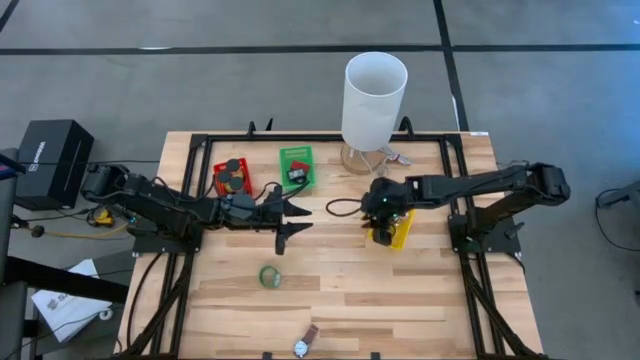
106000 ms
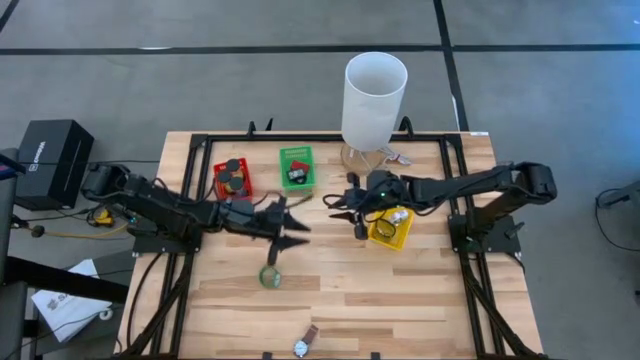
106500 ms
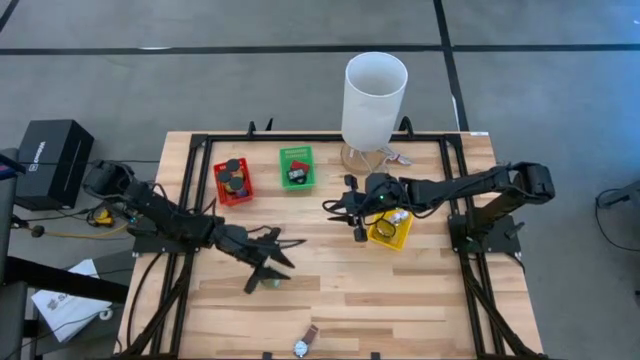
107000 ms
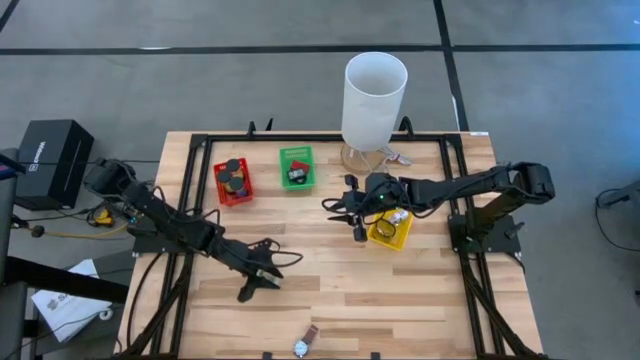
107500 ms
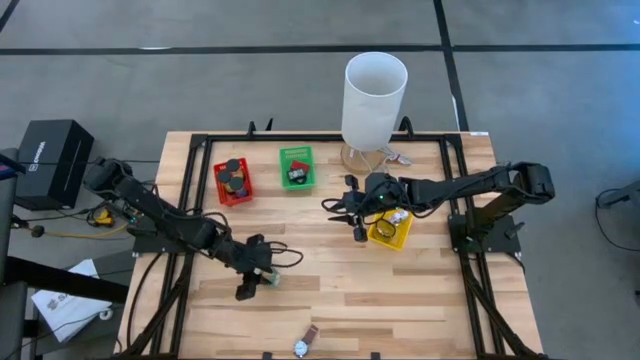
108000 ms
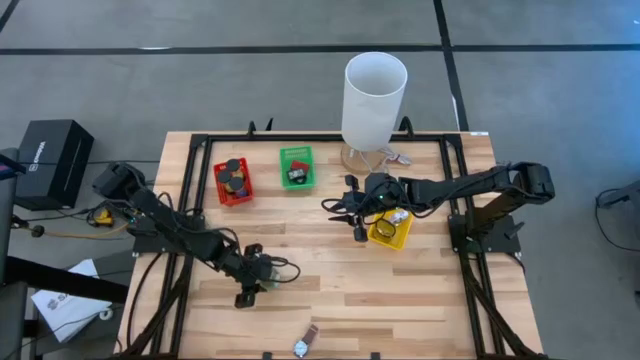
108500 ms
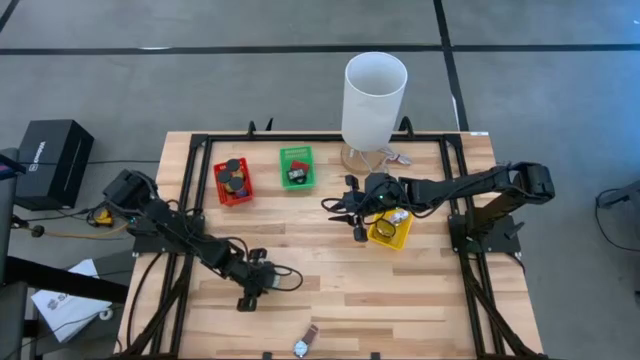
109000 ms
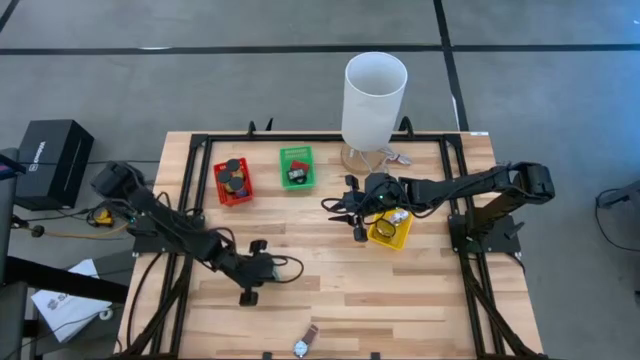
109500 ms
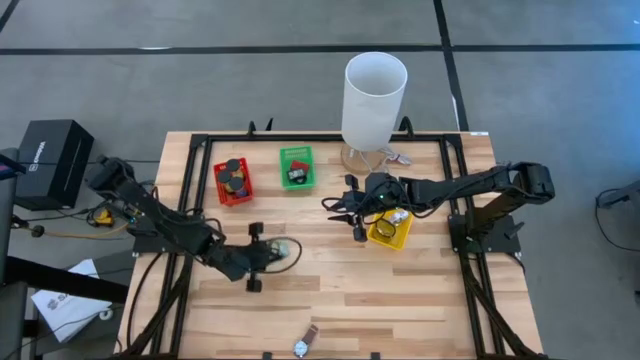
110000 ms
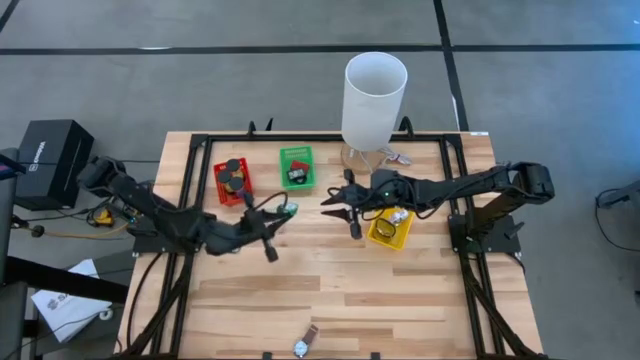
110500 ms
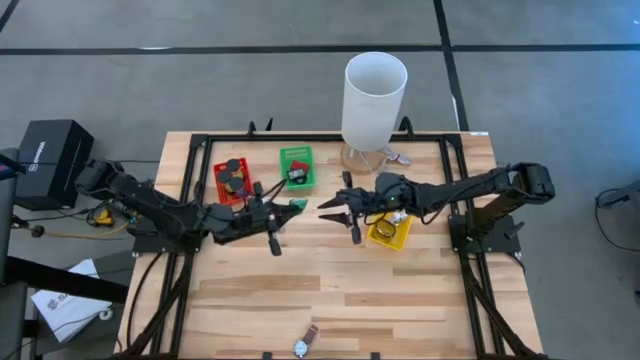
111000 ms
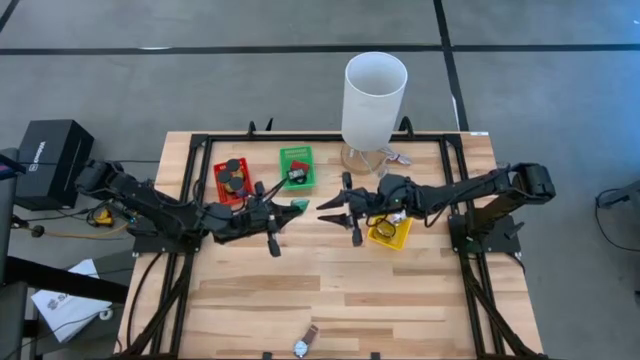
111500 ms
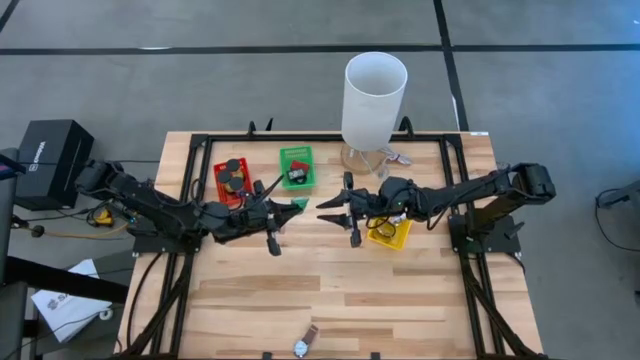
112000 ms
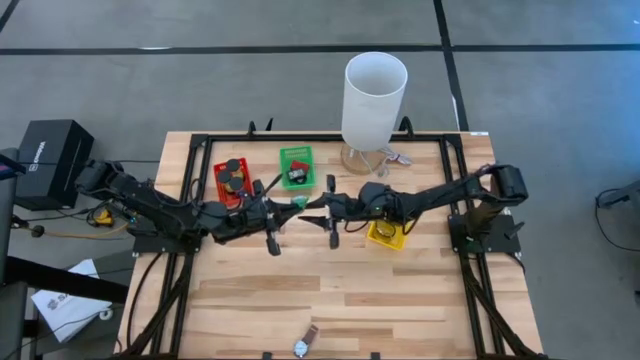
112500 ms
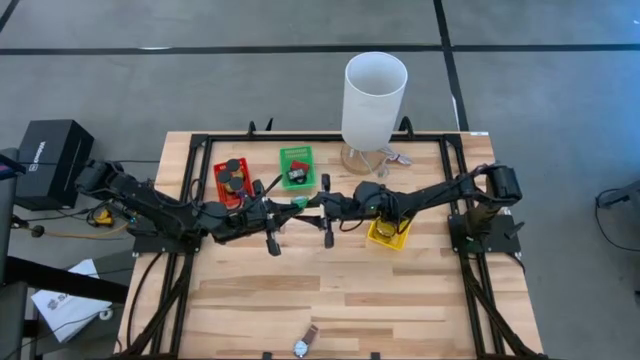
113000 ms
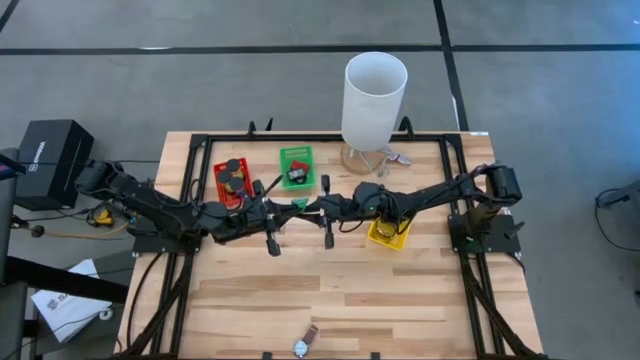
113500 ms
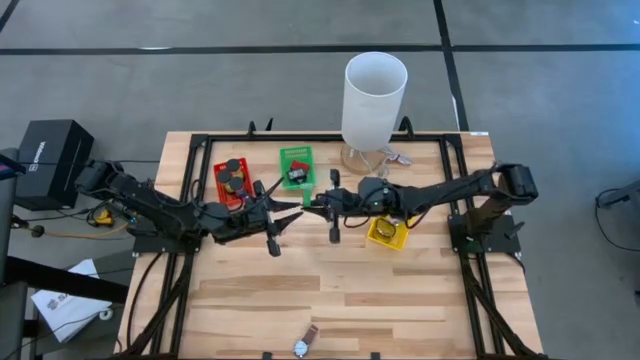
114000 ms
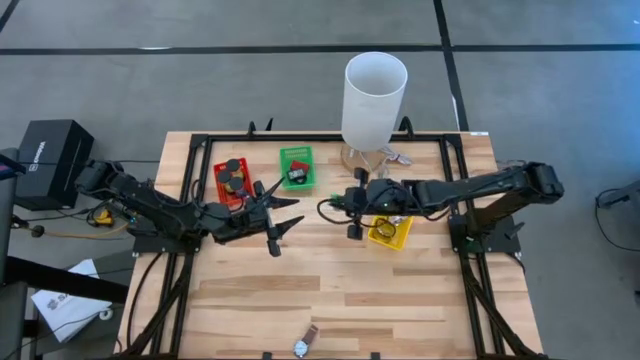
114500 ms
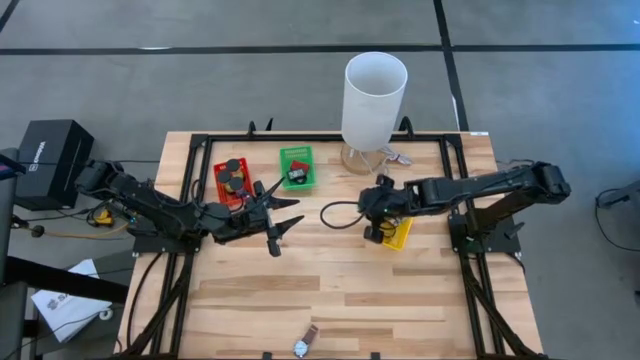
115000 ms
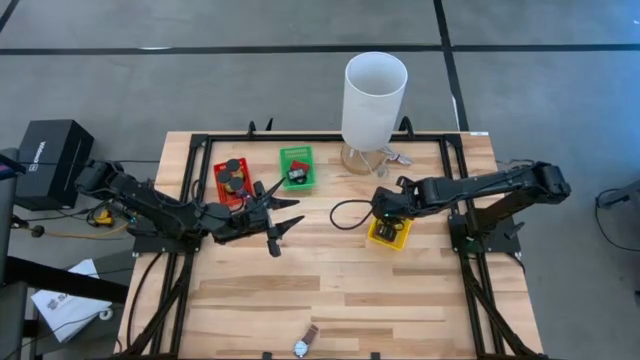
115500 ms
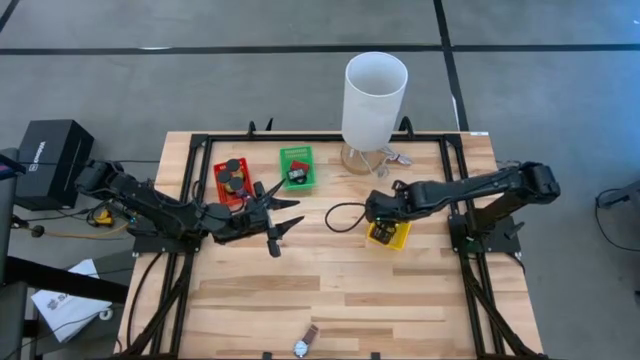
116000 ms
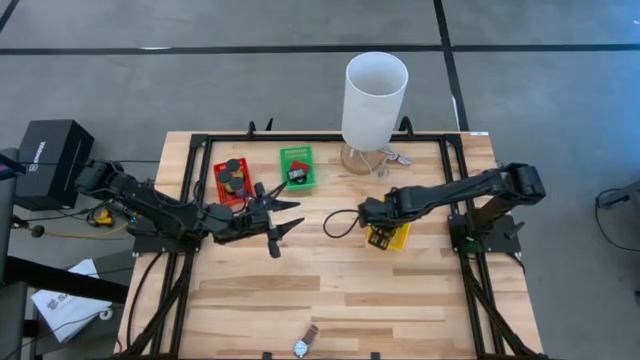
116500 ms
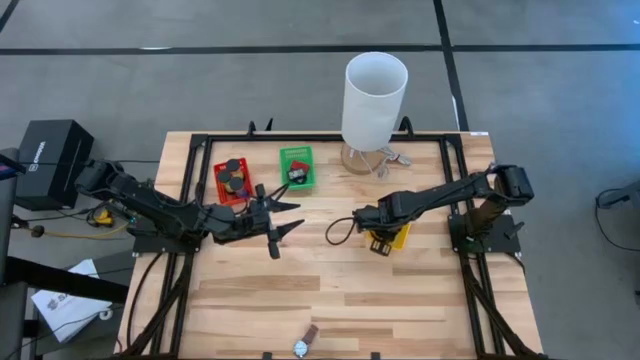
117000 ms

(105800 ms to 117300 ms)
Task: Pick & Place Office items
Put the green wrist watch into the yellow bin

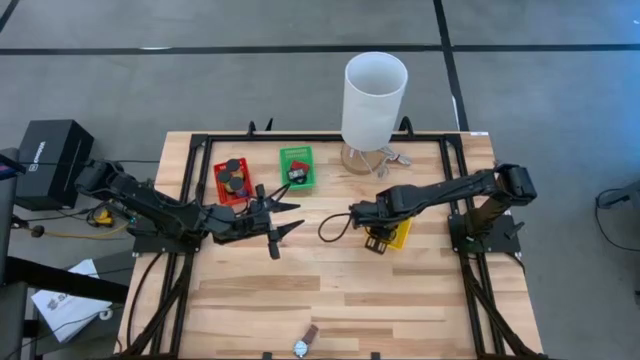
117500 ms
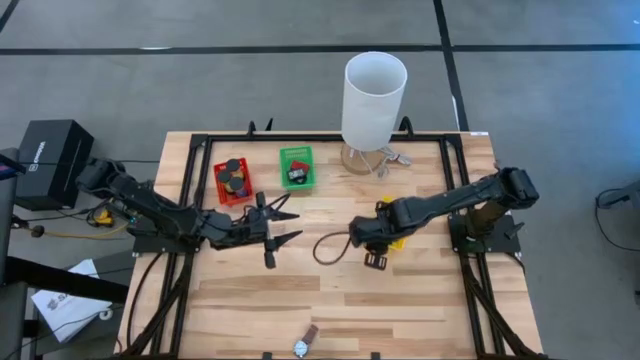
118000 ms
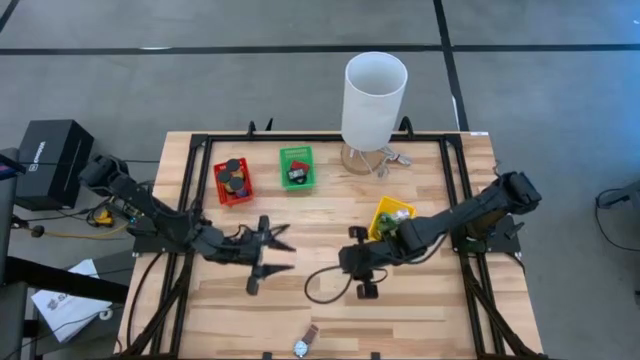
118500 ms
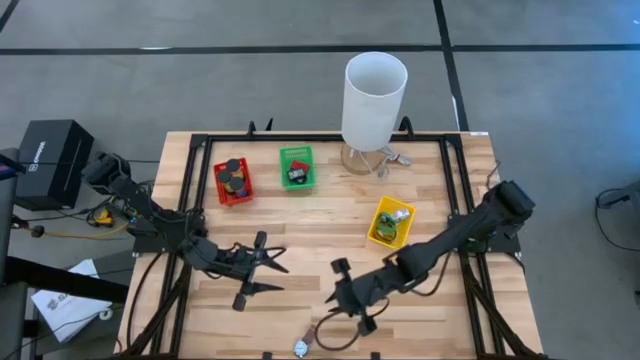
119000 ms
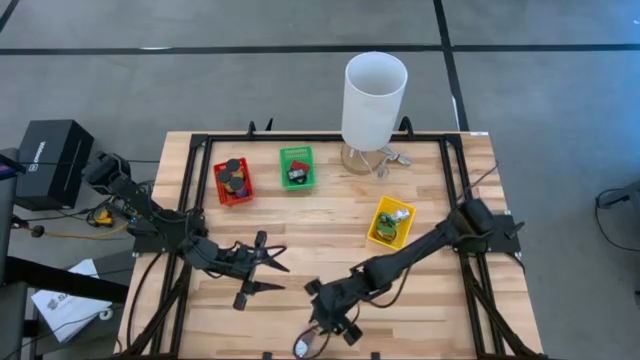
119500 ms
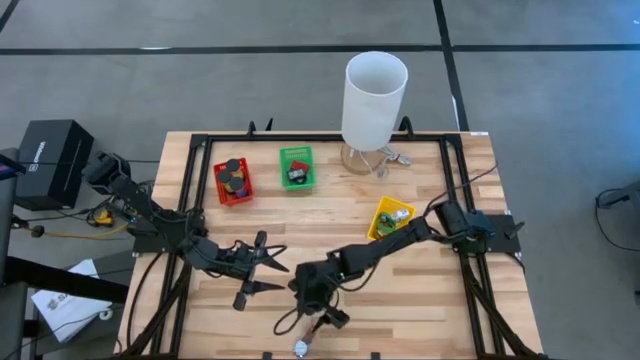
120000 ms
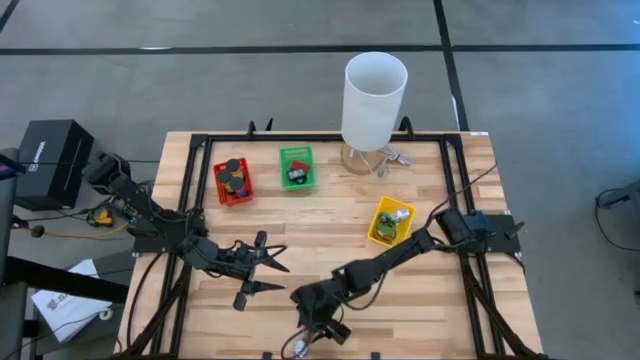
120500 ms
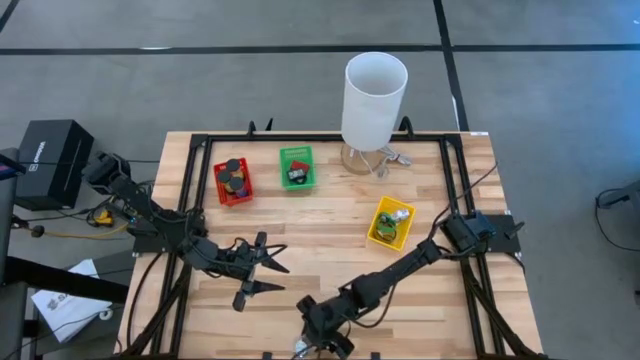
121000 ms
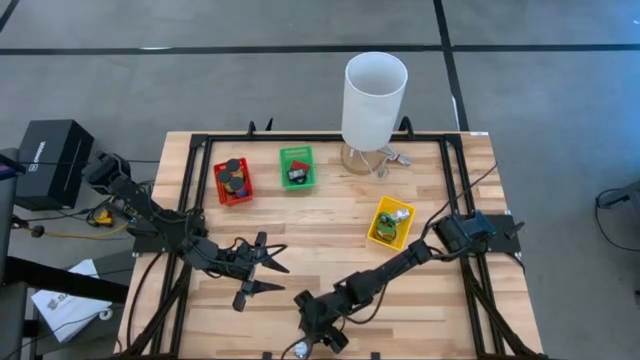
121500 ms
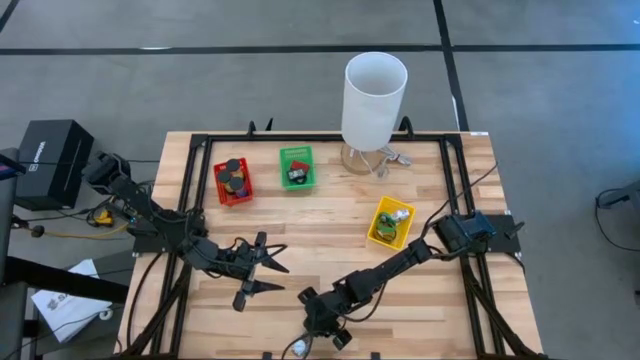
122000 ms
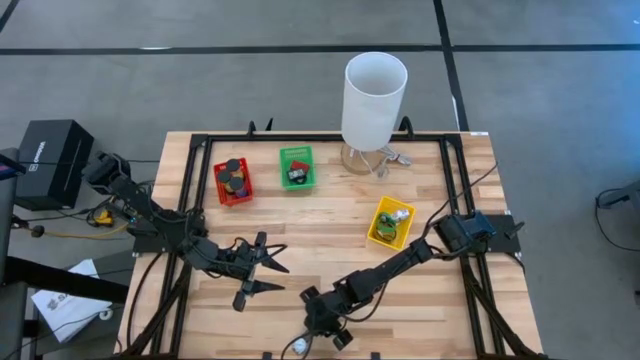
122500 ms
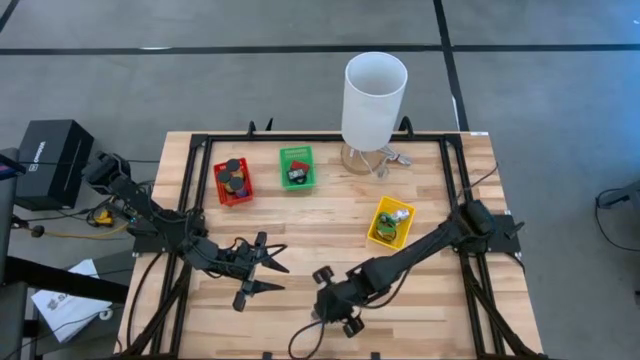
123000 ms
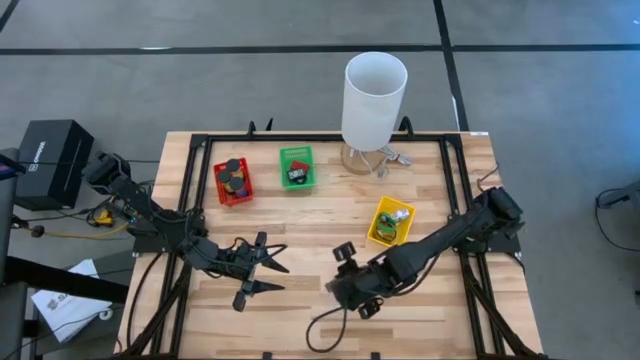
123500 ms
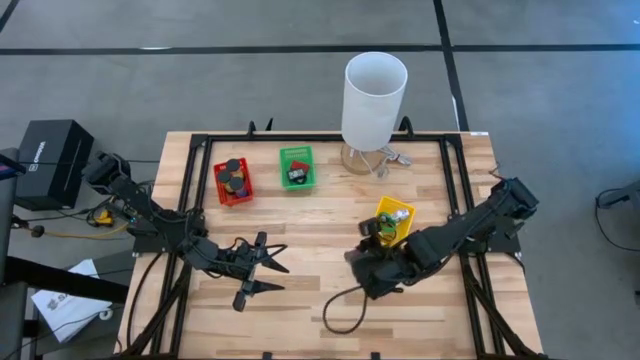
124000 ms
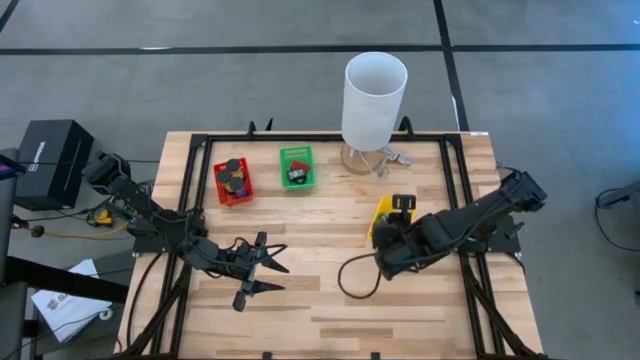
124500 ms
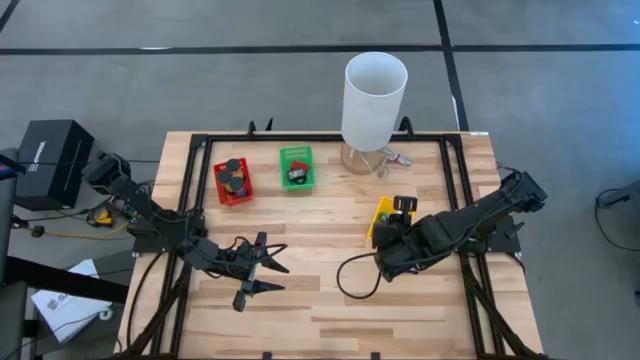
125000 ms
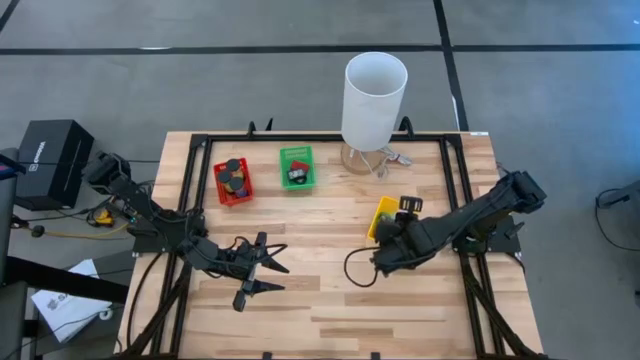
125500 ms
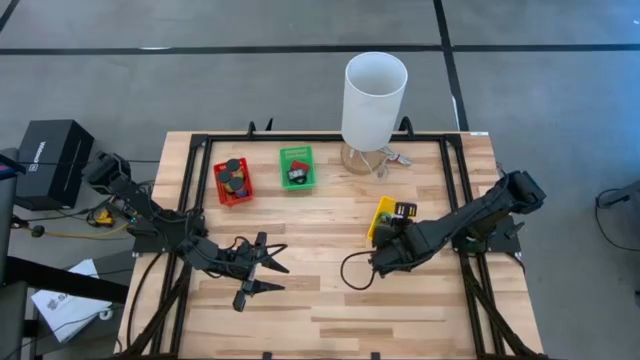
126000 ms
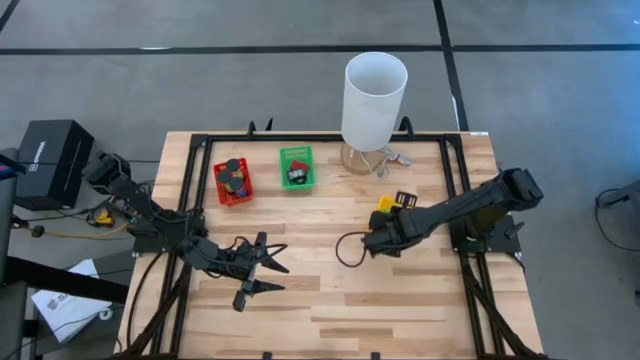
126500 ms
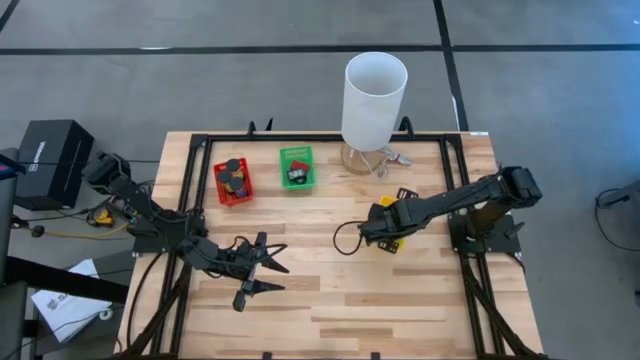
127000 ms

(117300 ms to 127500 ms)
Put the light brown wrist watch into the yellow bin

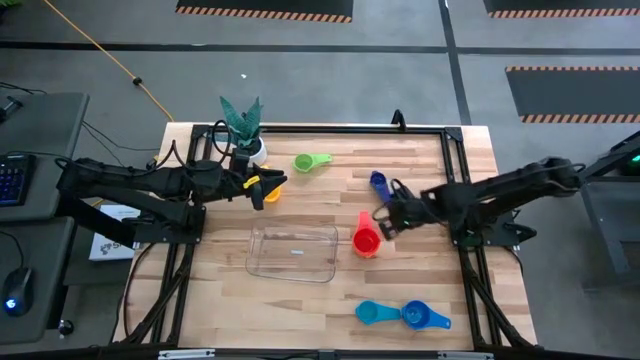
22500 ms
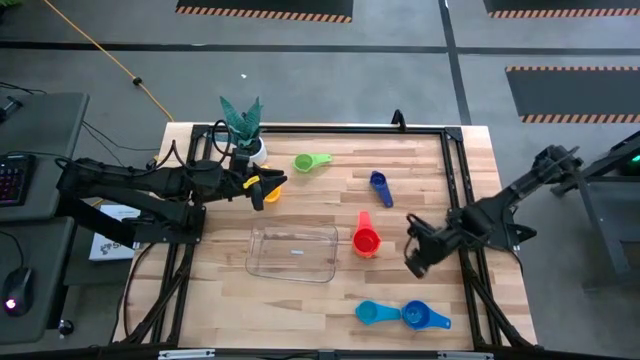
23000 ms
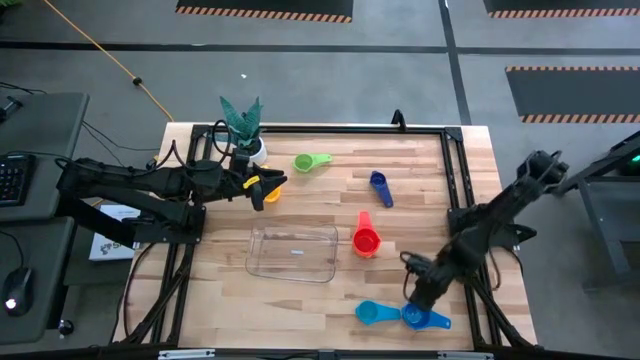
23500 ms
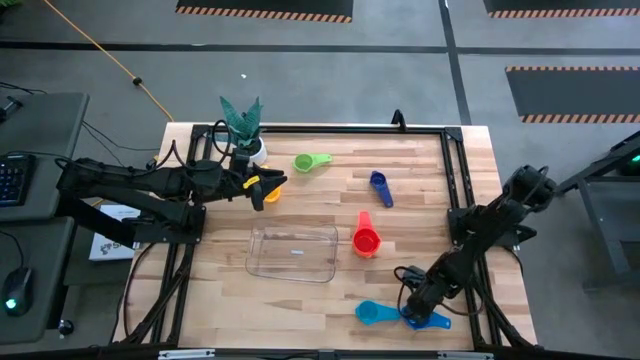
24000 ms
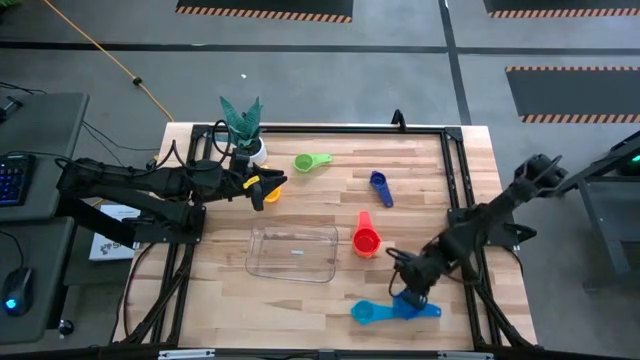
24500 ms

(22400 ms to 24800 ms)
Task: Nest measuring cups in basket
Stack the blue measuring cup on top of the red measuring cup
